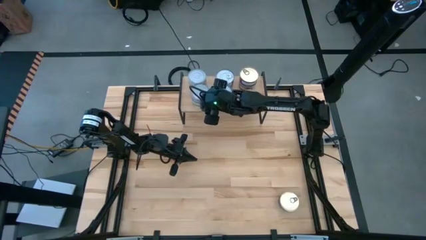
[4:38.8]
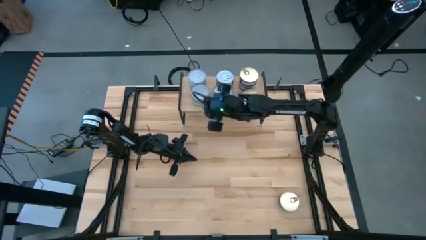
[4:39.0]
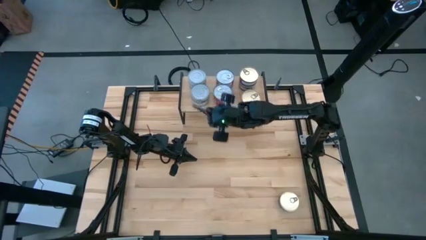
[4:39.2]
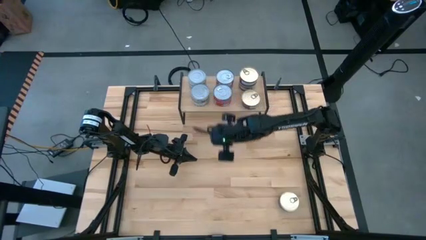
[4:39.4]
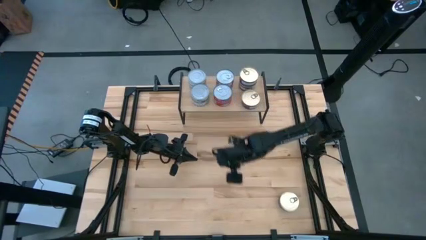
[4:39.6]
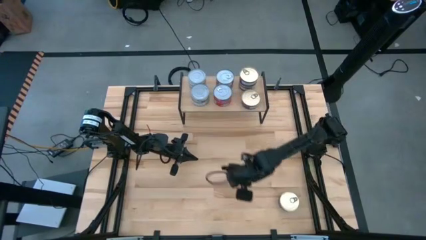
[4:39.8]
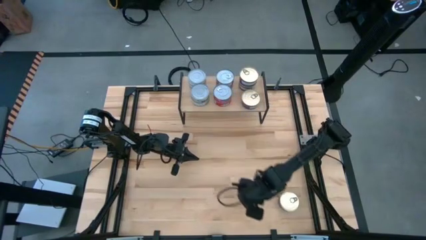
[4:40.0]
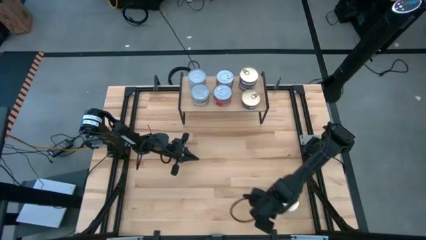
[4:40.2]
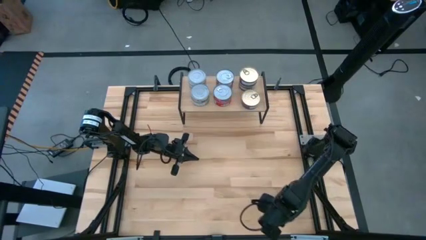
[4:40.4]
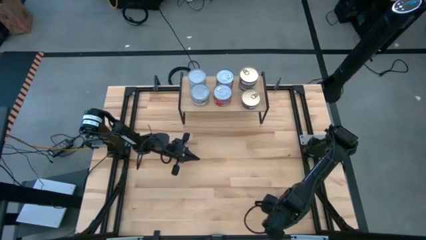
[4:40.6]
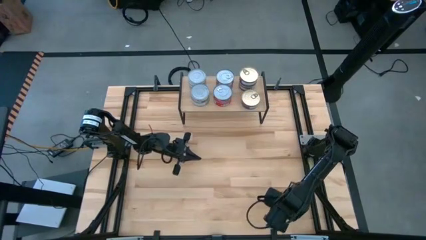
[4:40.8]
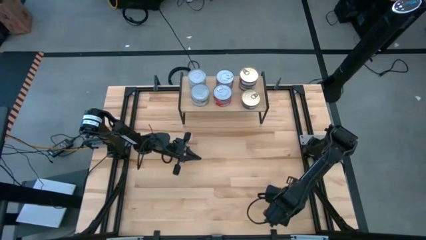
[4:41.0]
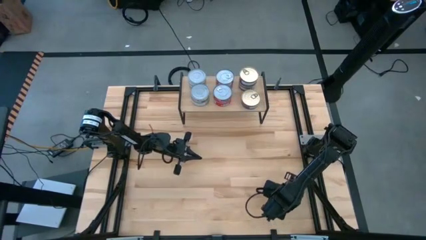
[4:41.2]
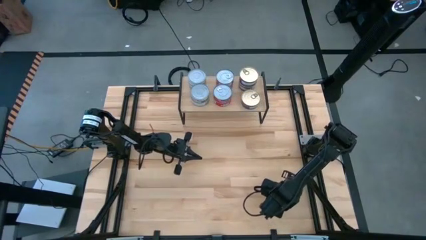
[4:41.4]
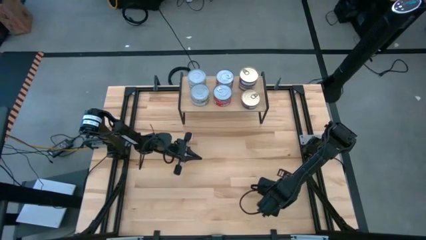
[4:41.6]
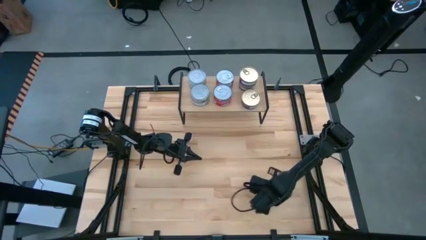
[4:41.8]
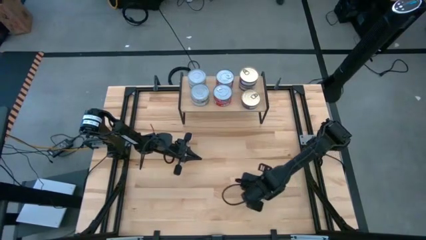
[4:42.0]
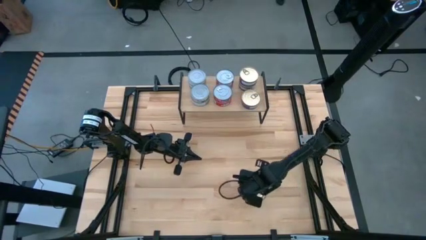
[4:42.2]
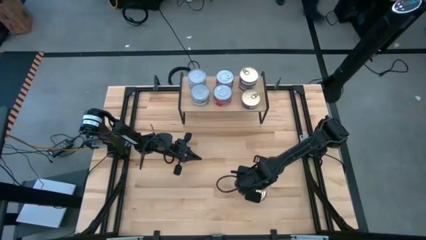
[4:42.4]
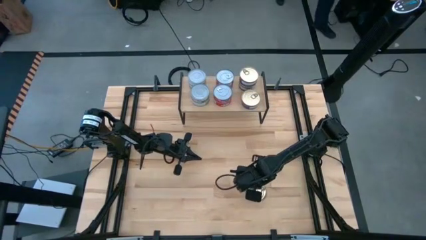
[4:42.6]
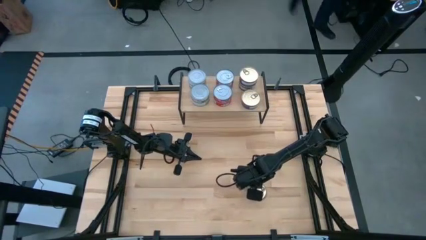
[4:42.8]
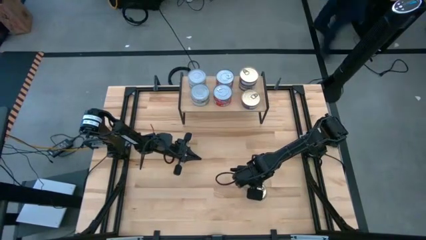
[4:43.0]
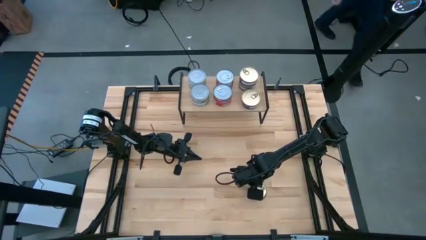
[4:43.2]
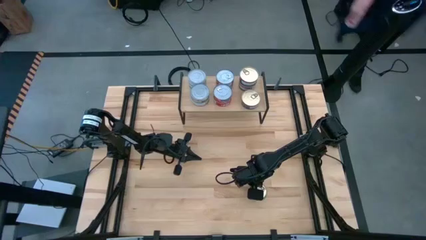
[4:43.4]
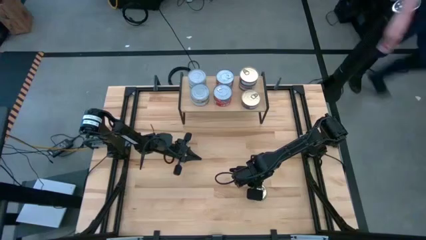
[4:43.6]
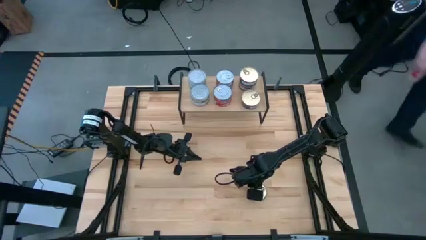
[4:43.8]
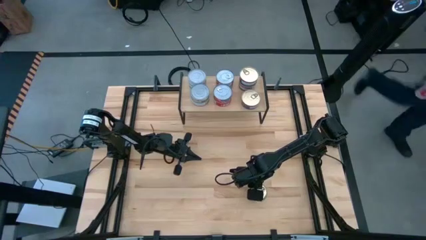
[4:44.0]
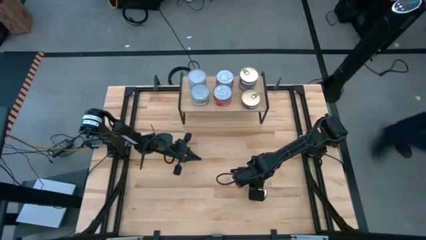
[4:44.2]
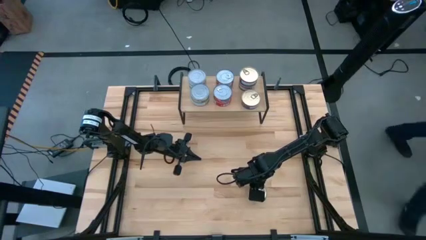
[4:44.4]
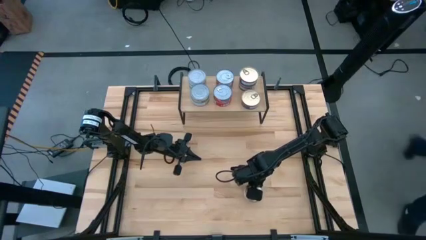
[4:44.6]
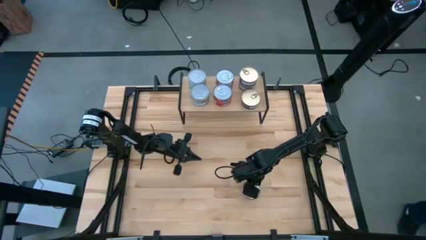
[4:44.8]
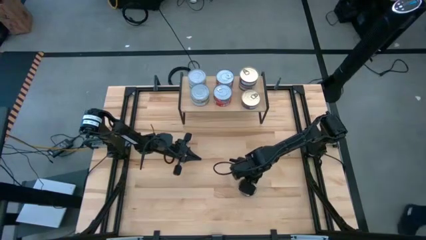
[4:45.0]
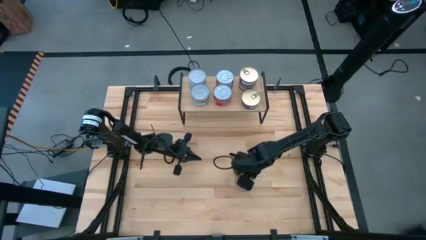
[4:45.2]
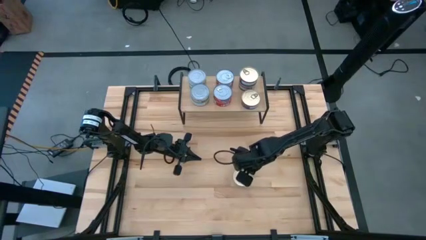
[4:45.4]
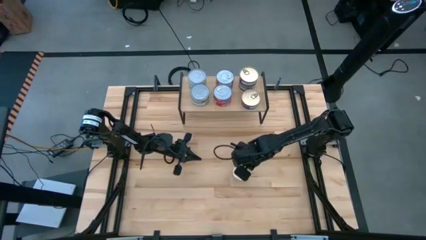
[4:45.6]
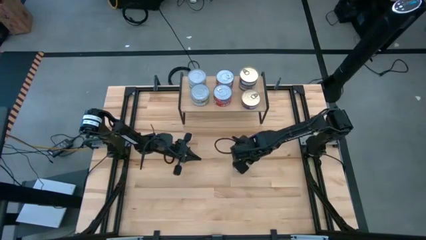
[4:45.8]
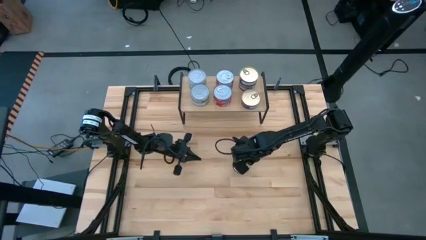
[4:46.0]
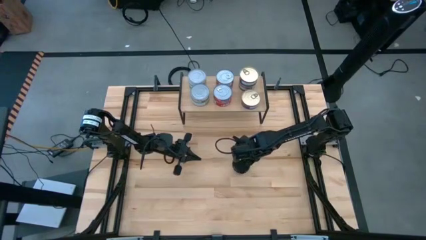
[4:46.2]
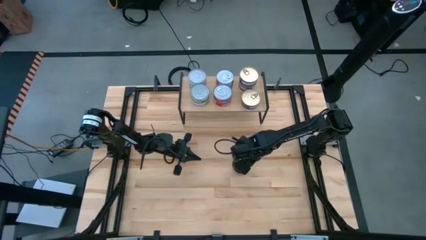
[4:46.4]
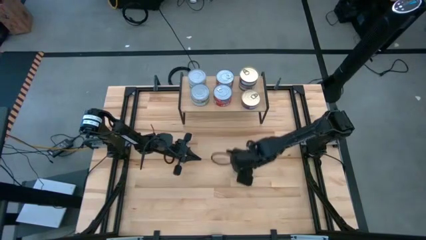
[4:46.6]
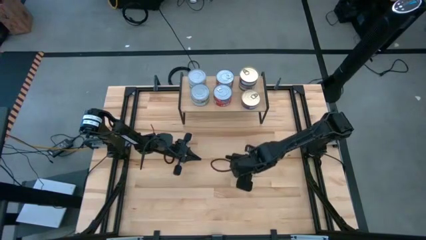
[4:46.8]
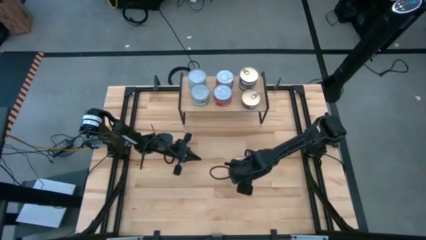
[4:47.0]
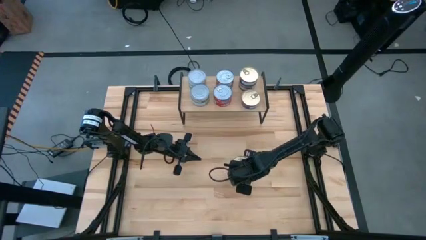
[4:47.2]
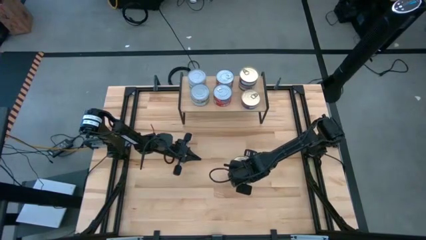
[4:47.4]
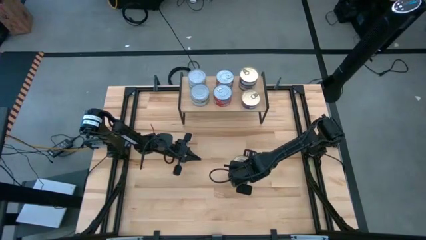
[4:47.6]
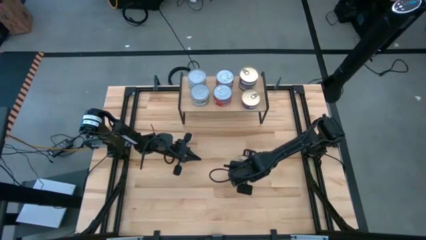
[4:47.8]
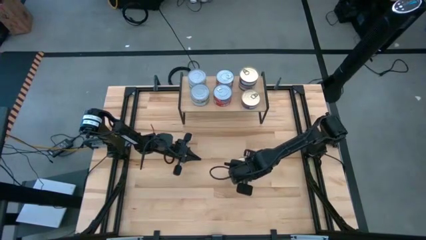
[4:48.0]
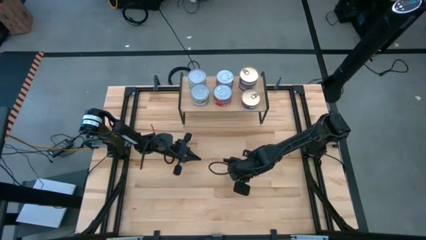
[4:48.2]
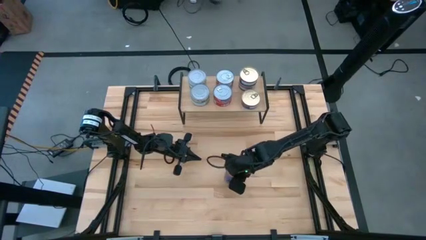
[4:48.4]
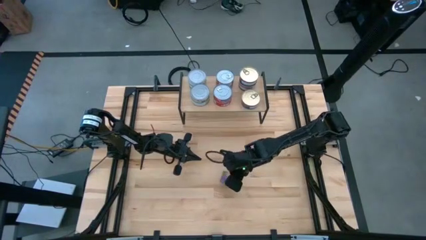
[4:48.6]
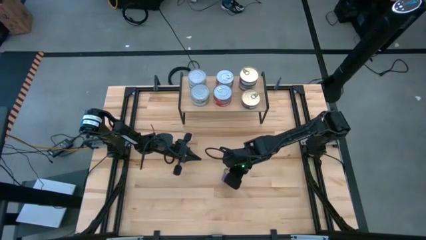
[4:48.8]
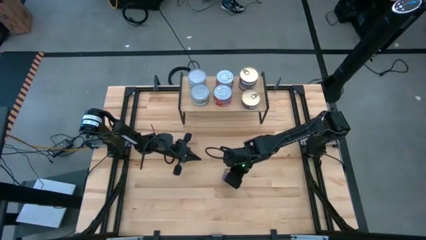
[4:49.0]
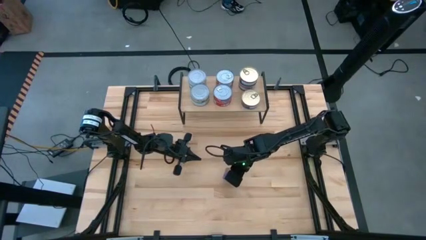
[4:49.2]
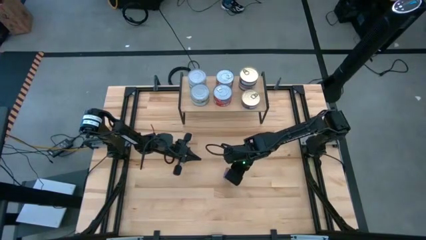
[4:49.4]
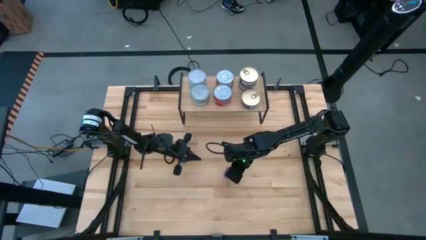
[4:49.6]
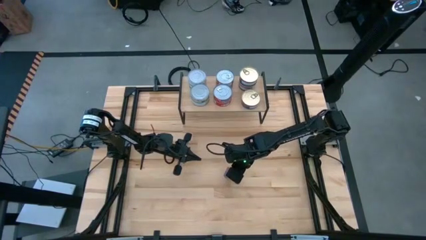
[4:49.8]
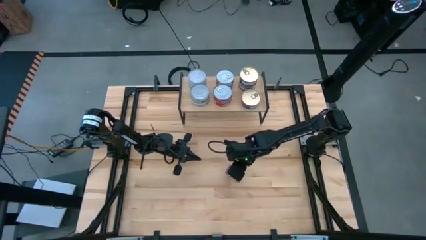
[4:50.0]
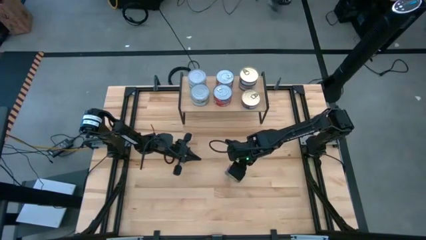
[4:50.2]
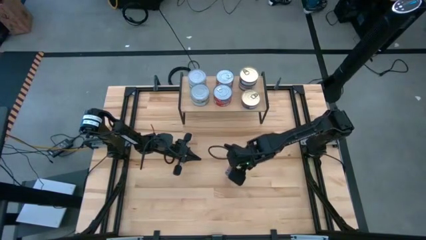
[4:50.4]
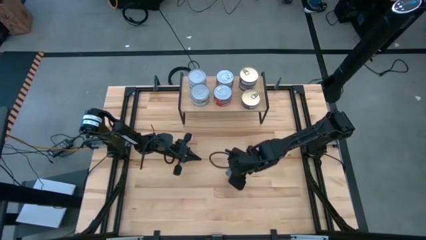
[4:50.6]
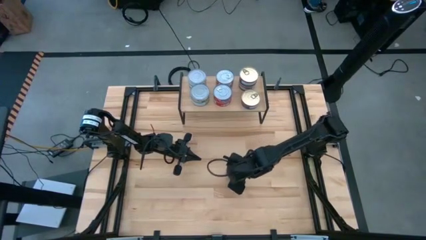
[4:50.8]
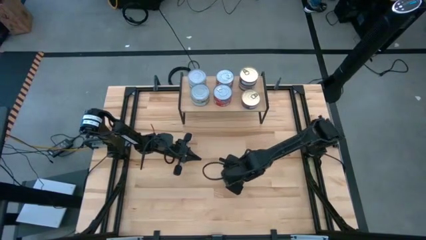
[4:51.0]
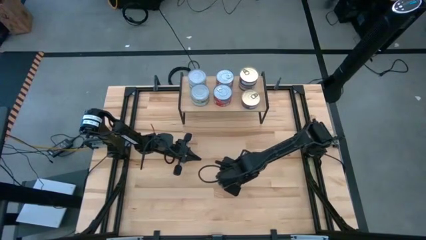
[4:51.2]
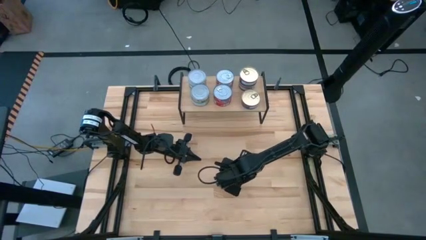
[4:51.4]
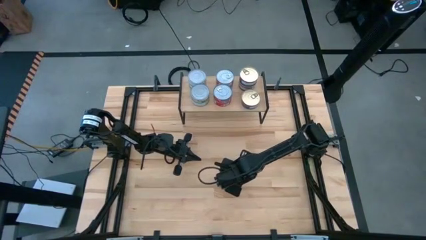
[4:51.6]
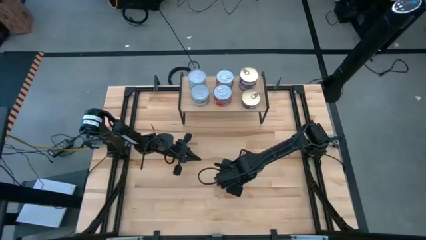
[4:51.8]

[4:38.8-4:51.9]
Task: Stack canned seafood by type on shelf
Return to Home Position

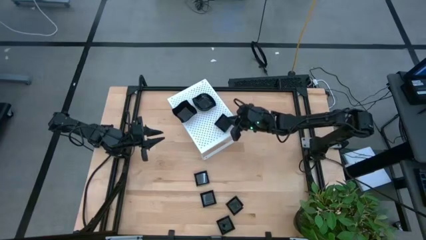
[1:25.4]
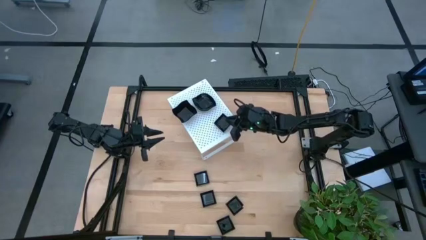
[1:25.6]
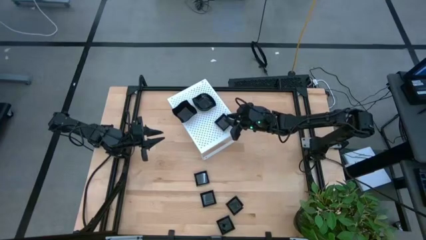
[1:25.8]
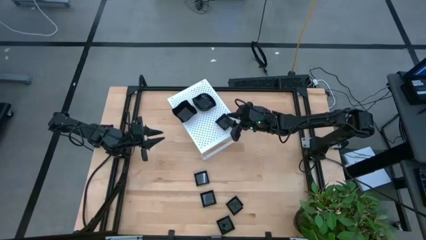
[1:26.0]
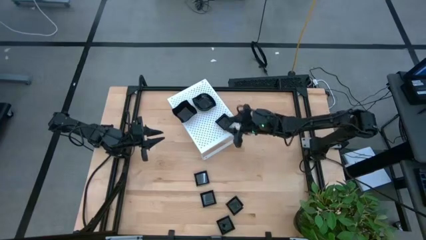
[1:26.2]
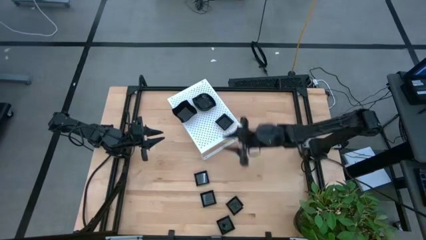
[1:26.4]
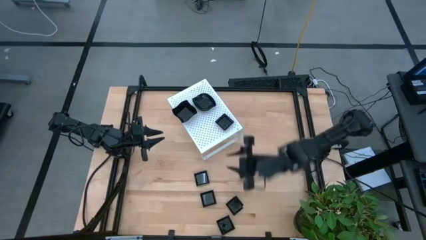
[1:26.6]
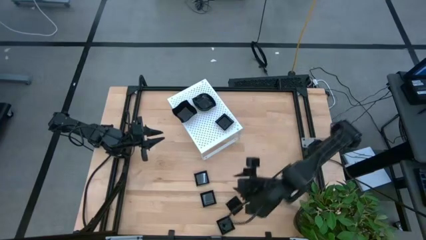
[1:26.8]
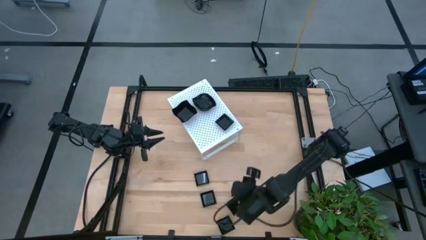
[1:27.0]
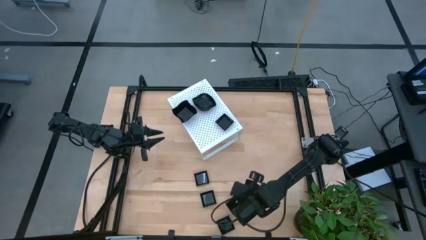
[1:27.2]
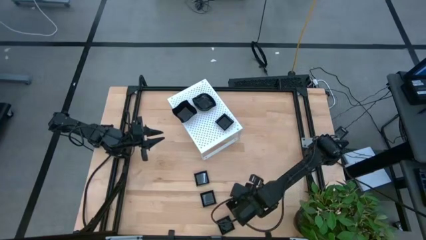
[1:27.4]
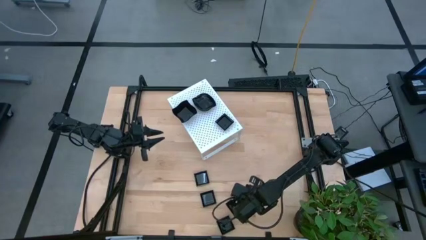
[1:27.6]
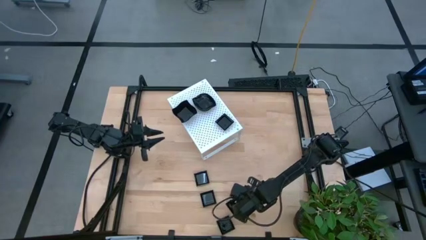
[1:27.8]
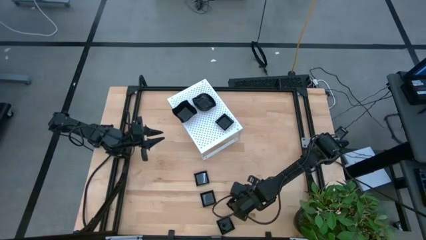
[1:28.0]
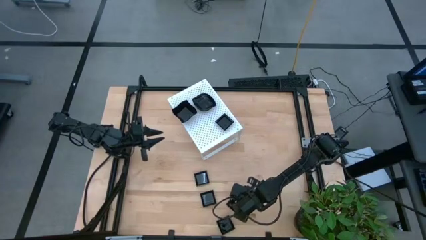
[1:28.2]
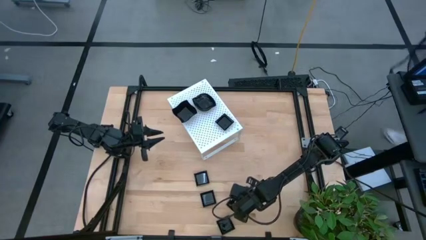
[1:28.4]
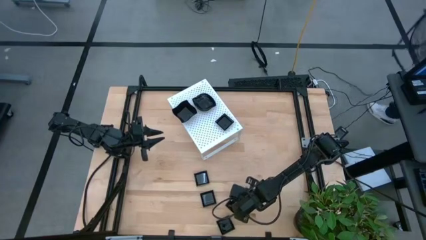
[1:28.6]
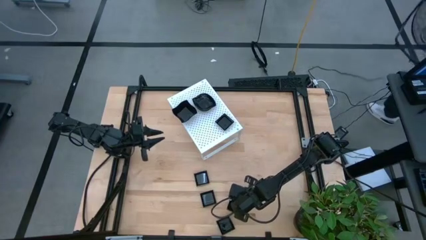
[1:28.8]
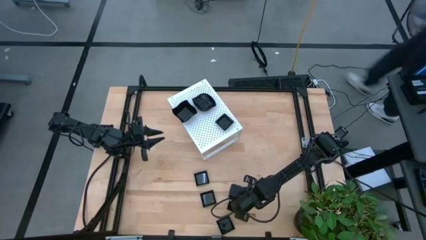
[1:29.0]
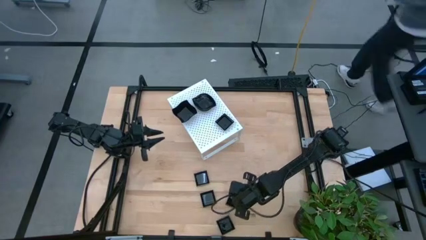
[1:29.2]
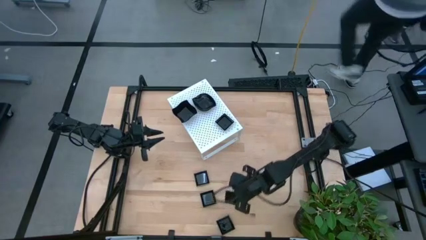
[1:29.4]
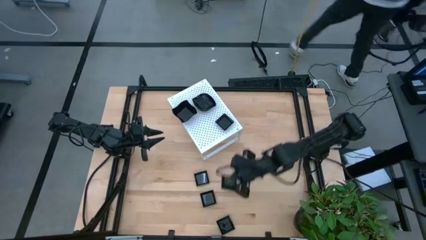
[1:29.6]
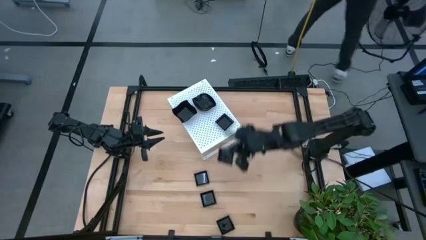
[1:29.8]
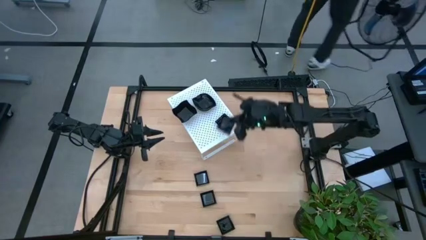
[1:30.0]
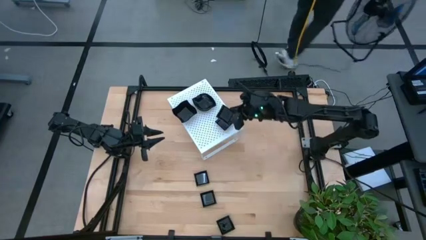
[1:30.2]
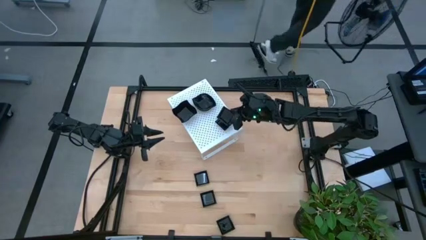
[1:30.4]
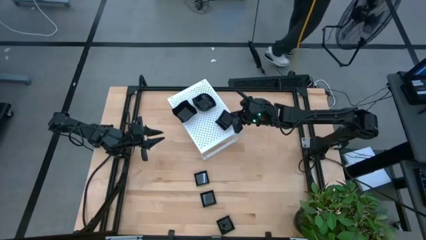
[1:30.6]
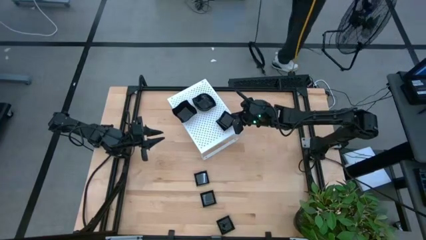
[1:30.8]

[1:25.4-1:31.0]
Task: Pick & Place Mini shaped plates
Stack the square plate on top of the other square plate on the shelf
